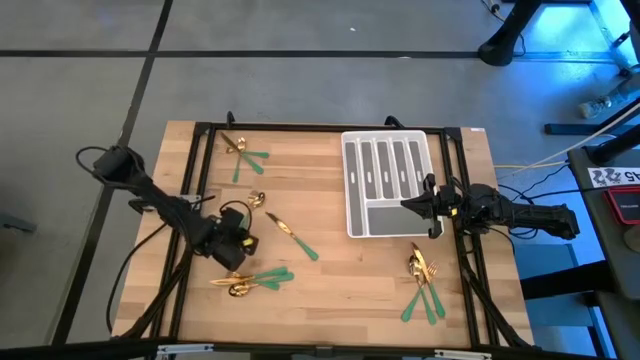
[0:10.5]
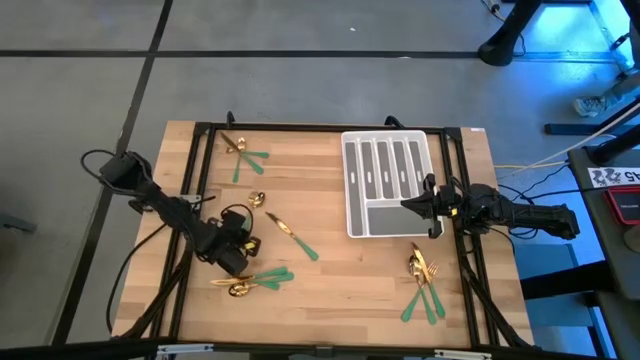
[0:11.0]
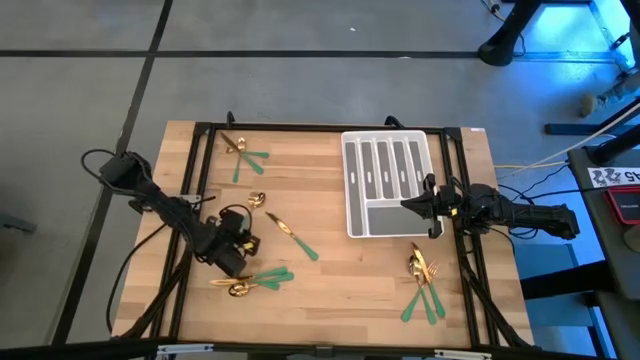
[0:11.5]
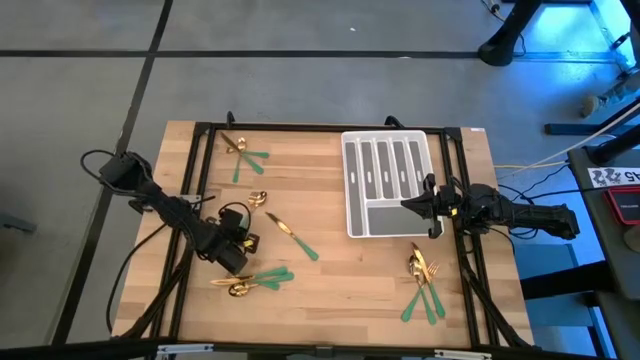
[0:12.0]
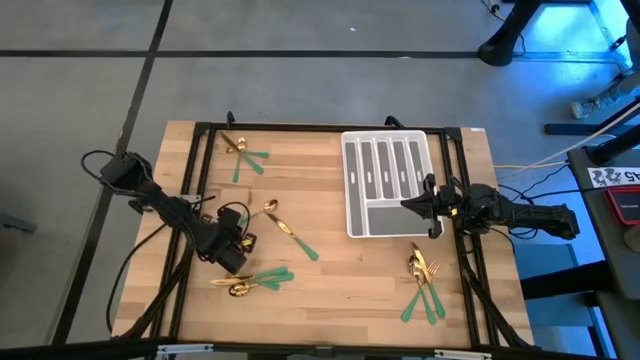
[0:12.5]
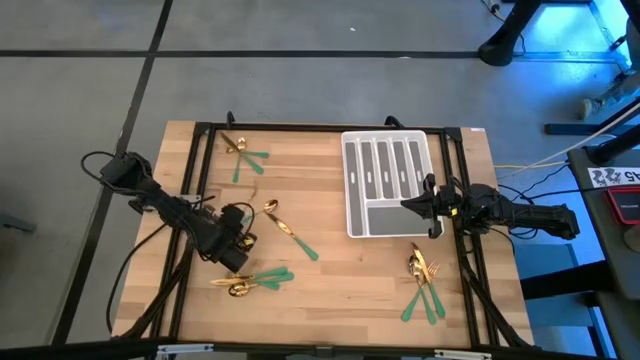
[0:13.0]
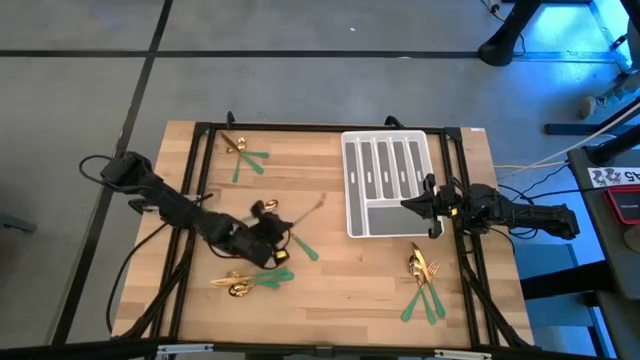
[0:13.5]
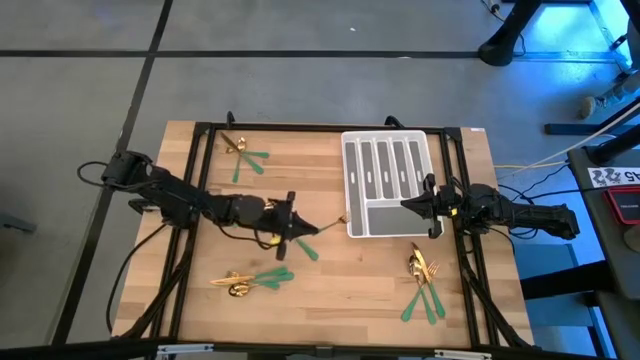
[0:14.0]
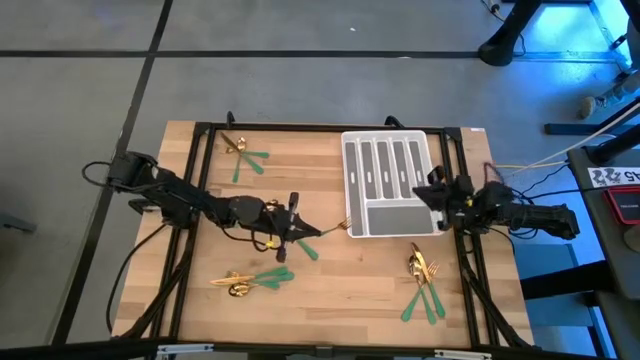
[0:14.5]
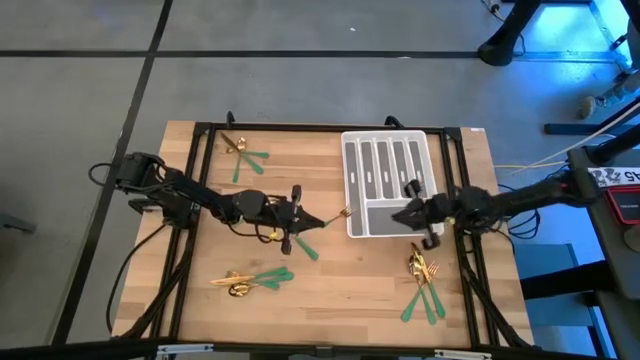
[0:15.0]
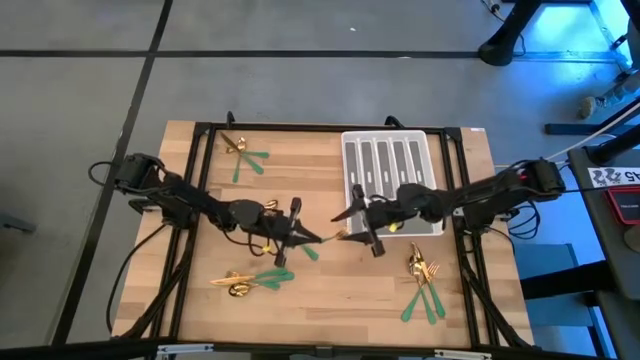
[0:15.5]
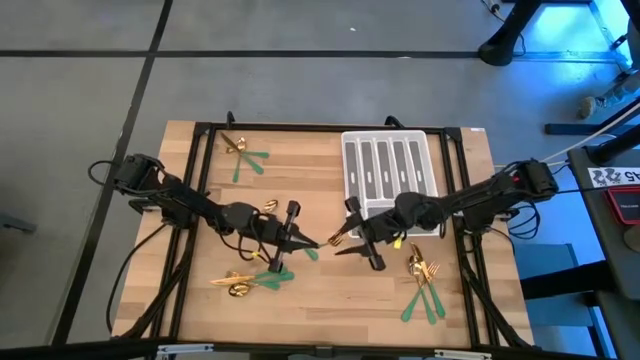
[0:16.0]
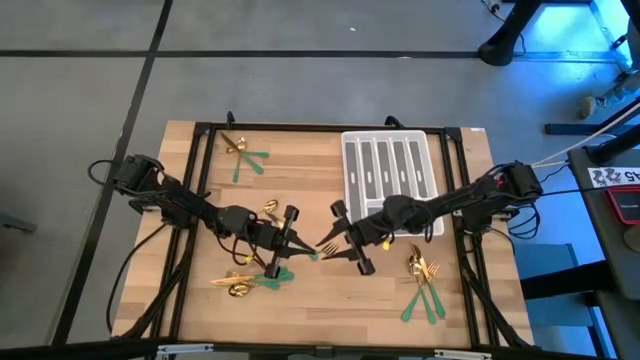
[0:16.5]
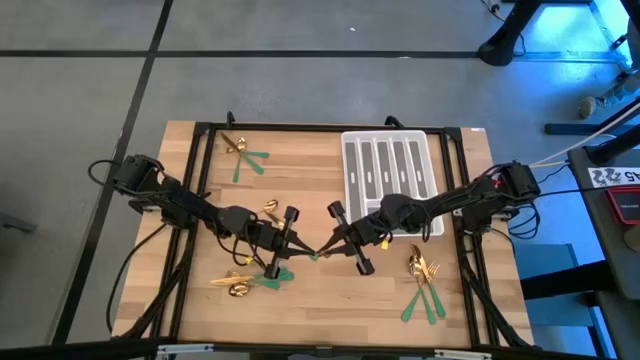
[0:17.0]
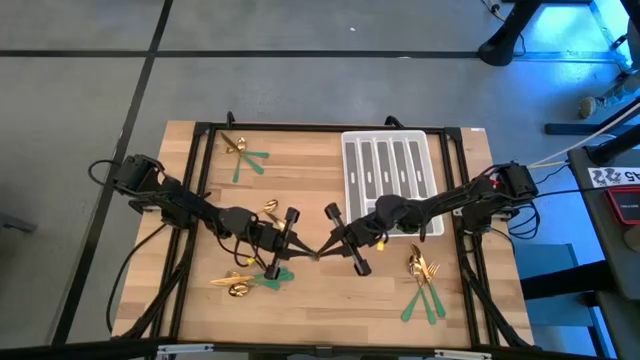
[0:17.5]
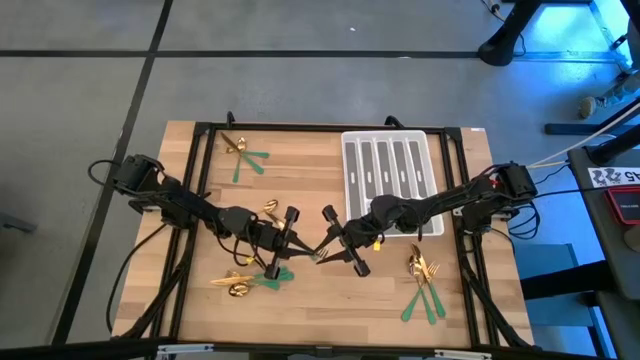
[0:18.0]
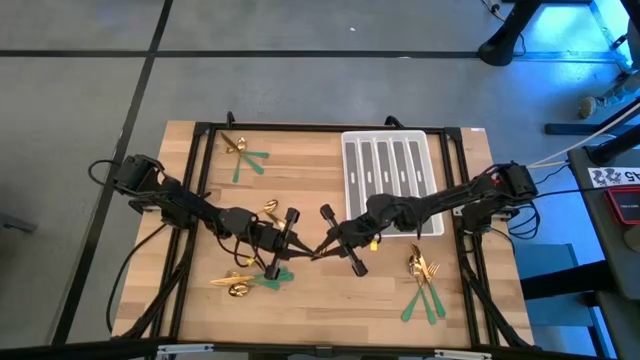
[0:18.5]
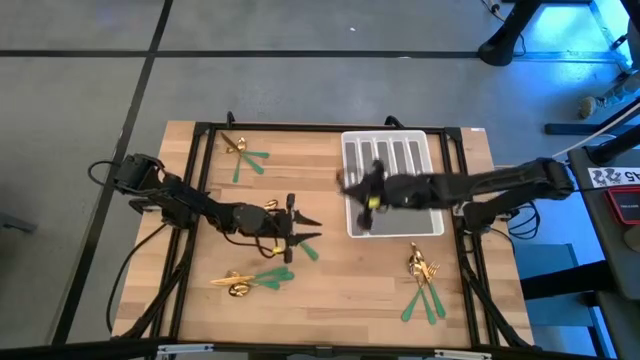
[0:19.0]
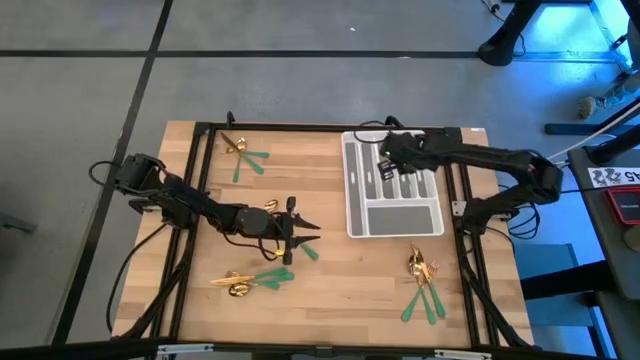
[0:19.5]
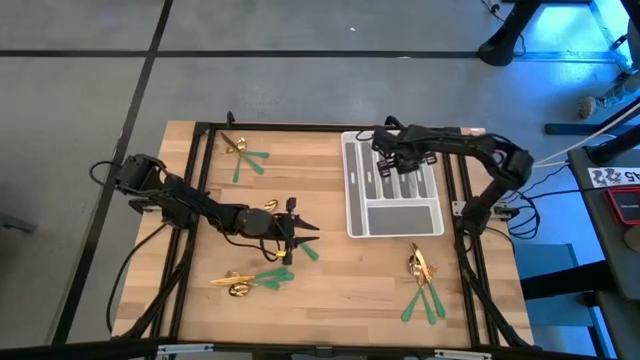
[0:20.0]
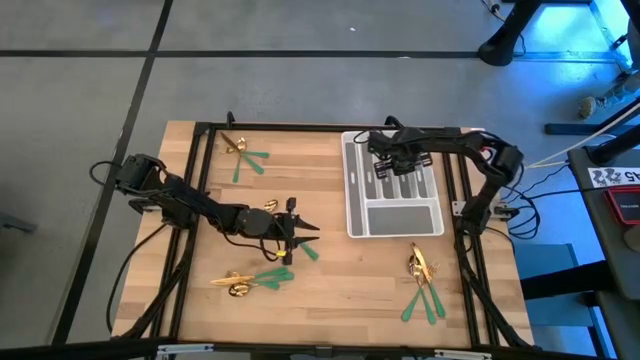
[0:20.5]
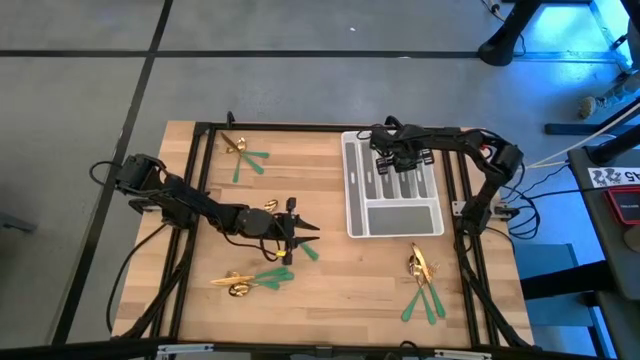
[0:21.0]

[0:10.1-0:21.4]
Task: Sort silverware
Put the green fork into the silverware tray

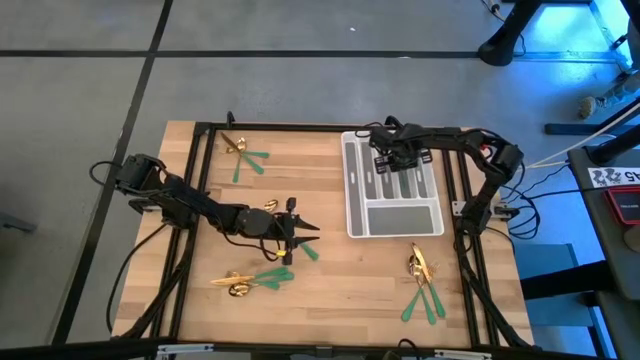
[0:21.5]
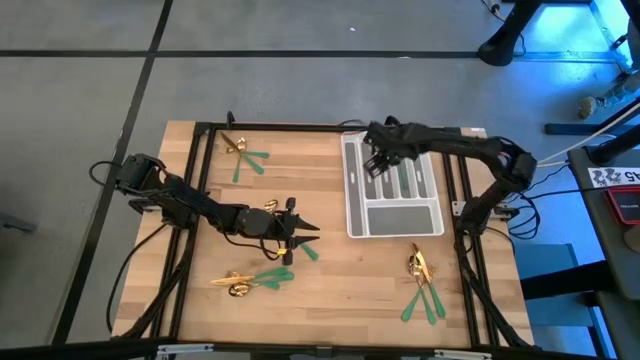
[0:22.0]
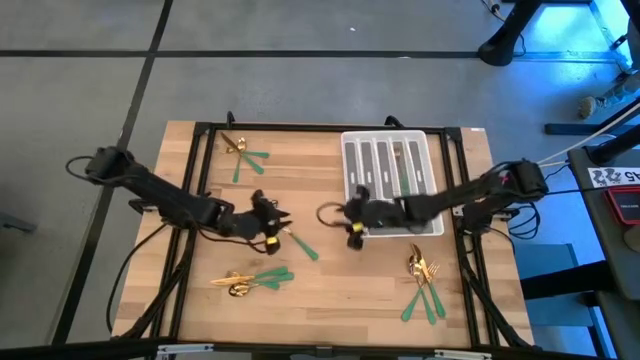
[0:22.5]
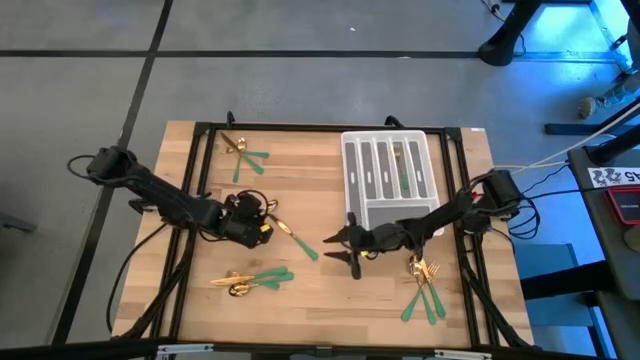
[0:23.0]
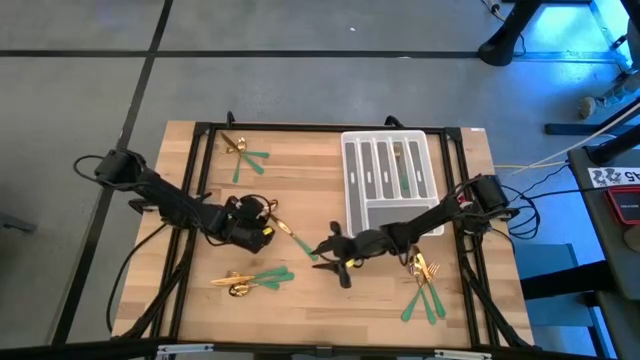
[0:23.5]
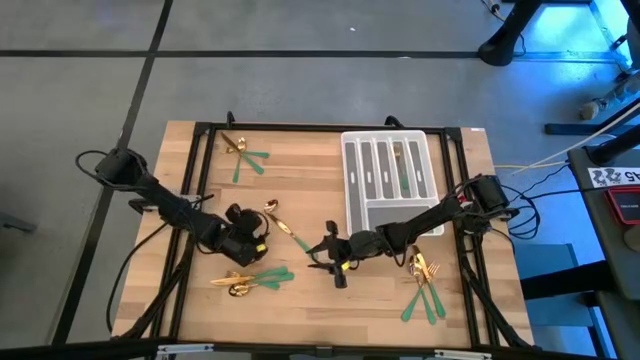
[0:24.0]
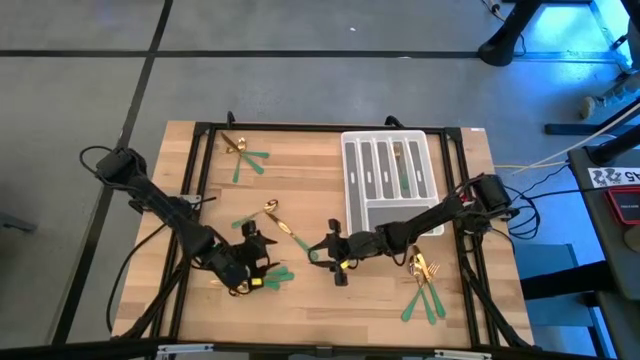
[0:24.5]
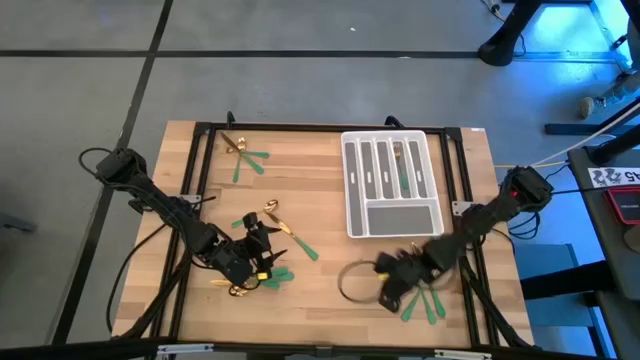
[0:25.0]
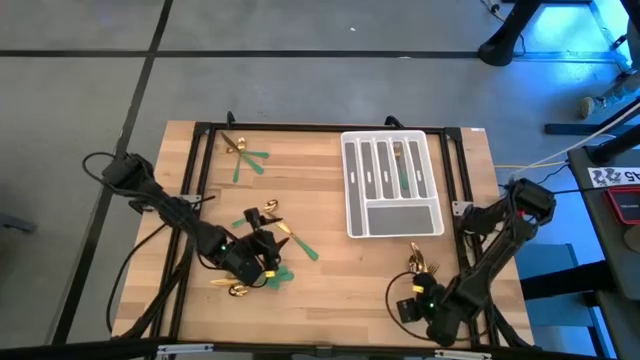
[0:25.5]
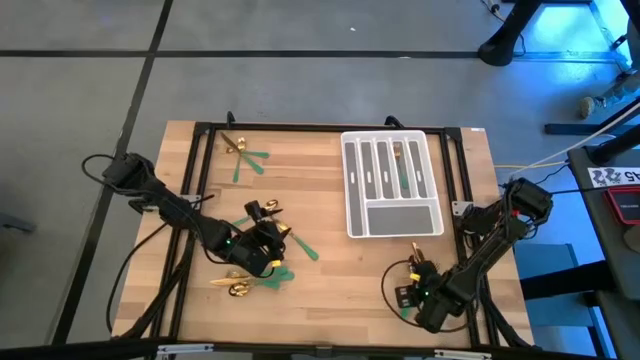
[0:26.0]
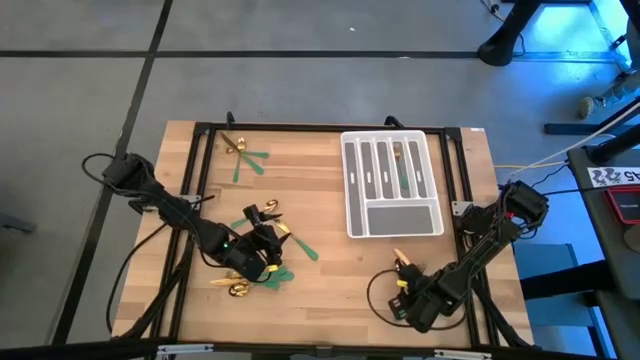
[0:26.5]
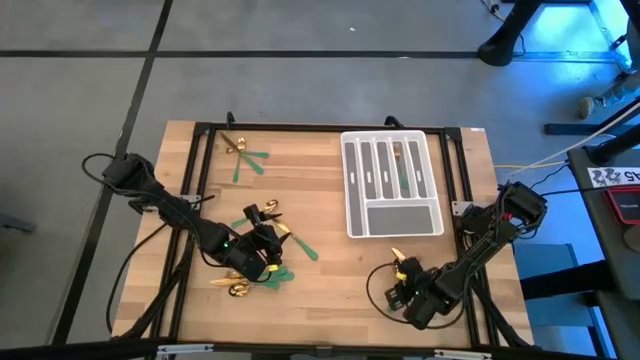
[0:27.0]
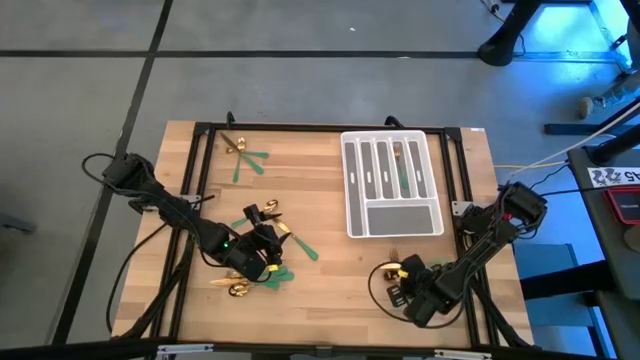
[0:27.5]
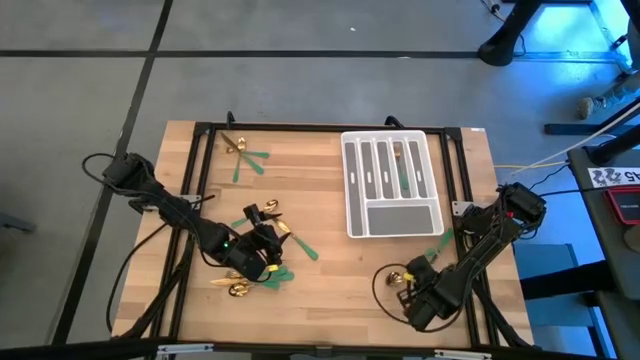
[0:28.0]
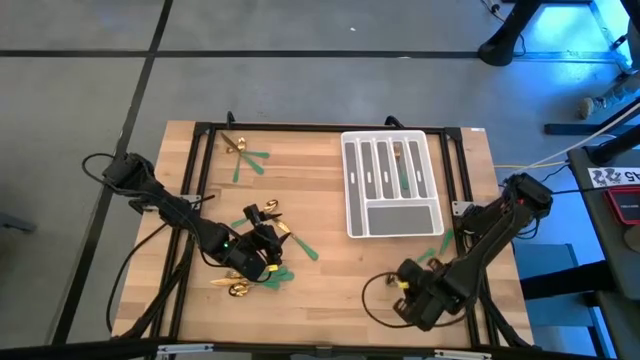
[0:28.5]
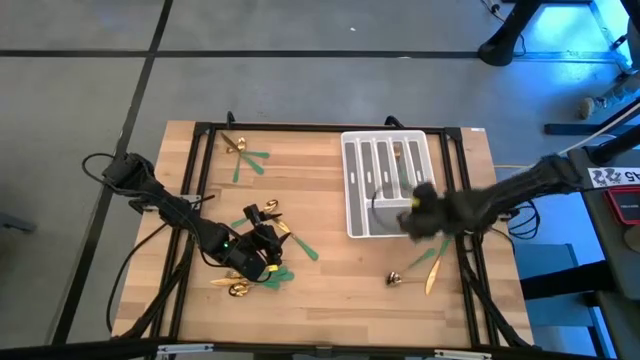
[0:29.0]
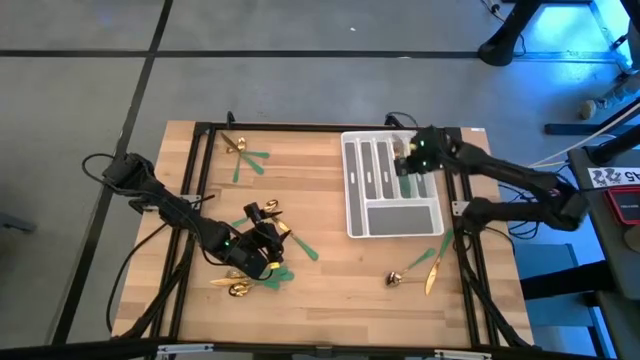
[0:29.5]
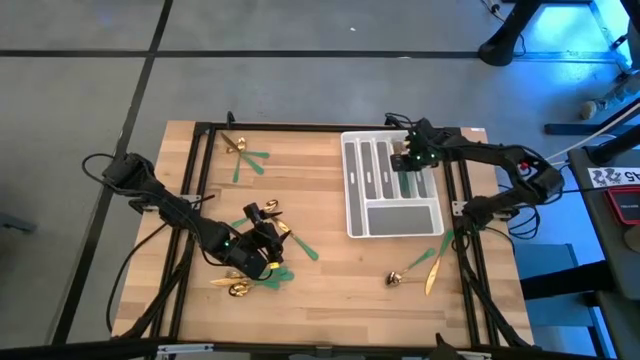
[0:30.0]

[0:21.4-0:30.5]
Put the green fork into the silverware tray

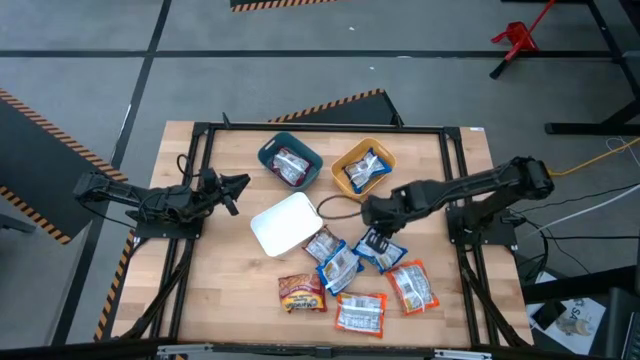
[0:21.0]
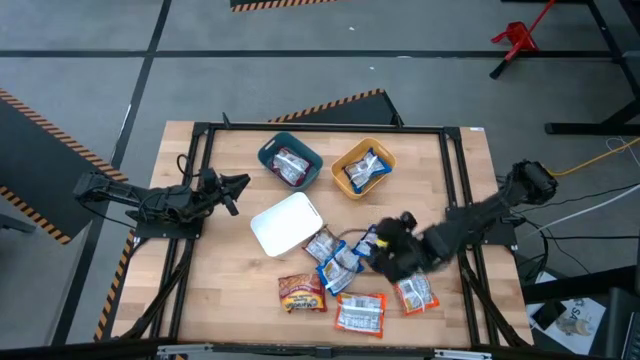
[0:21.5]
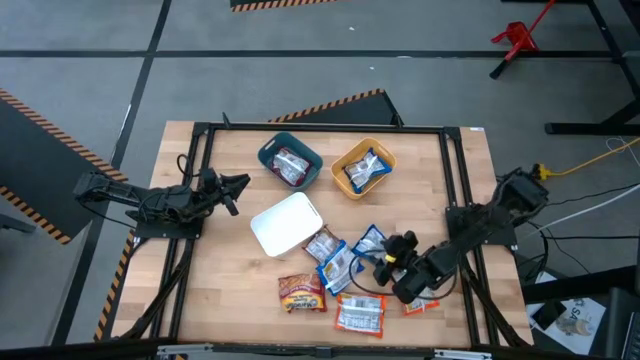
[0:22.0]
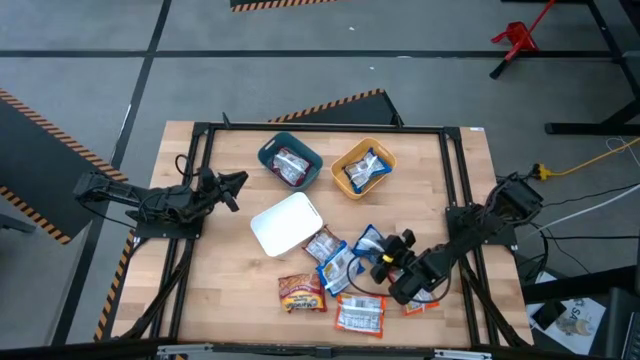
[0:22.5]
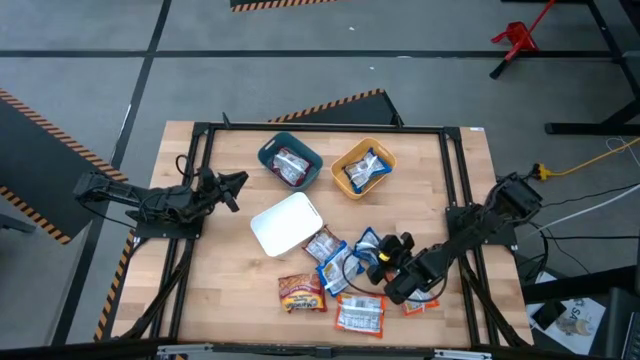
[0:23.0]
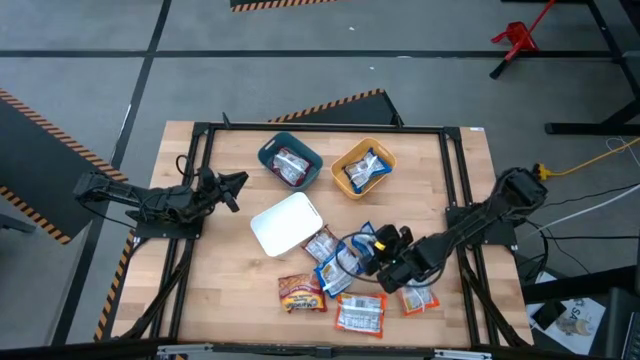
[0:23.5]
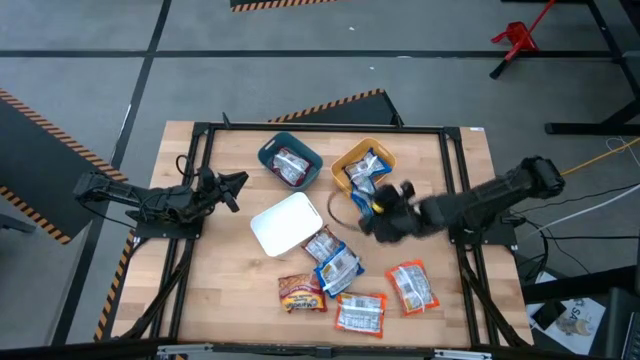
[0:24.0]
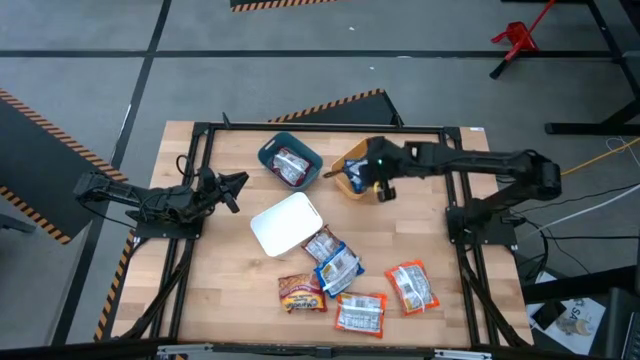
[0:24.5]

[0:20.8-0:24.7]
Task: Sort Maruchan noodles
Put the right blue noodle pack into the yellow bin
